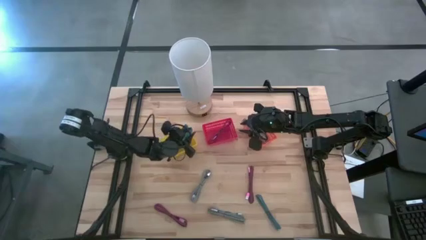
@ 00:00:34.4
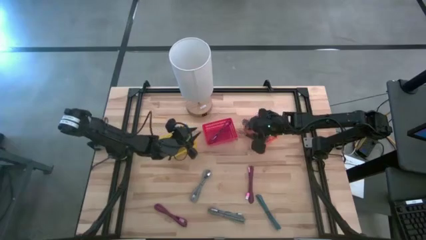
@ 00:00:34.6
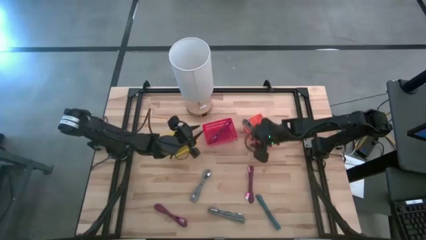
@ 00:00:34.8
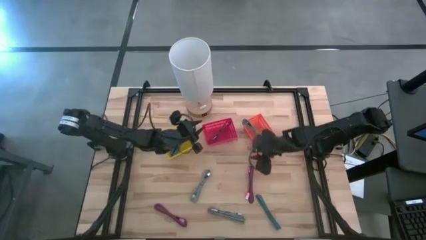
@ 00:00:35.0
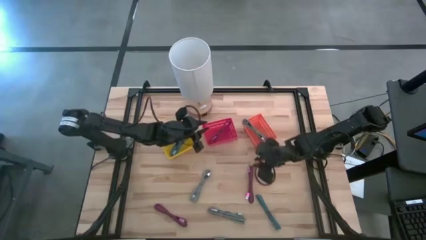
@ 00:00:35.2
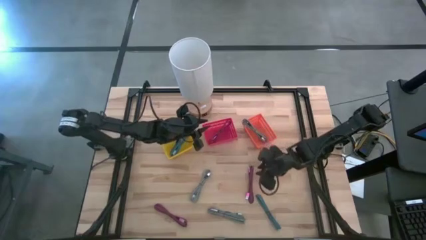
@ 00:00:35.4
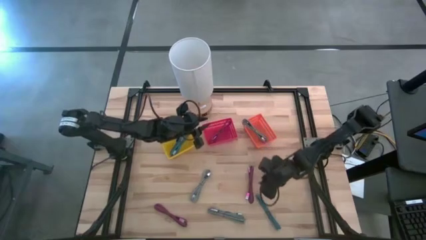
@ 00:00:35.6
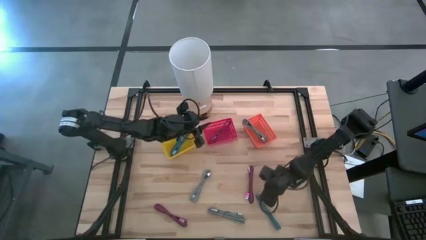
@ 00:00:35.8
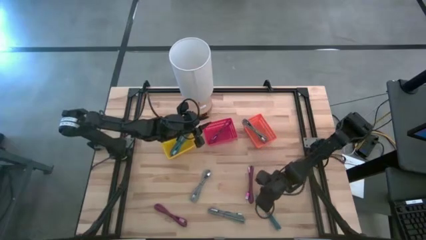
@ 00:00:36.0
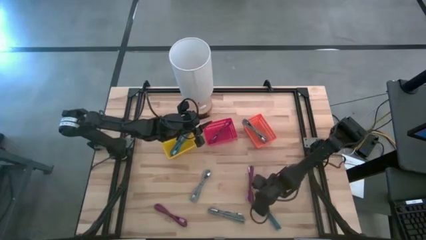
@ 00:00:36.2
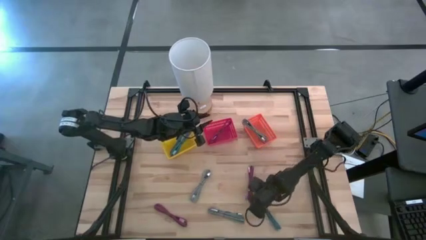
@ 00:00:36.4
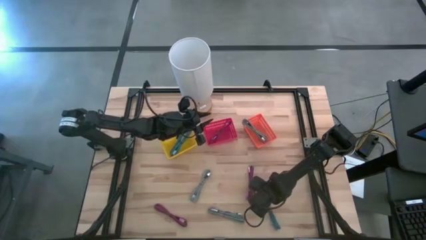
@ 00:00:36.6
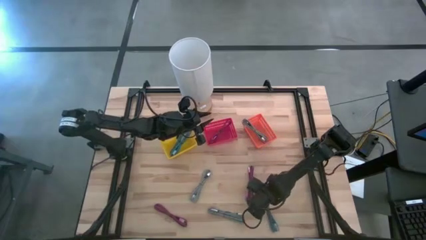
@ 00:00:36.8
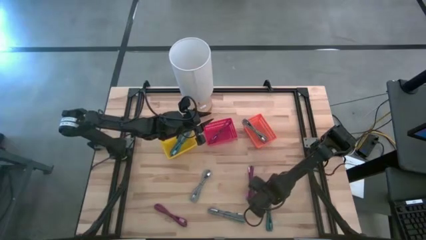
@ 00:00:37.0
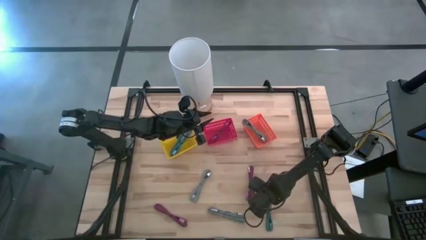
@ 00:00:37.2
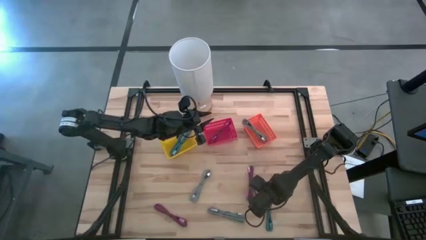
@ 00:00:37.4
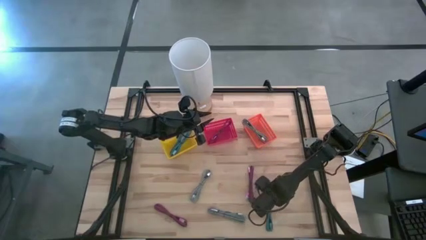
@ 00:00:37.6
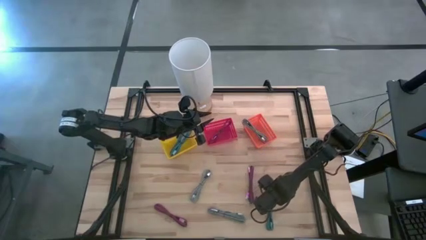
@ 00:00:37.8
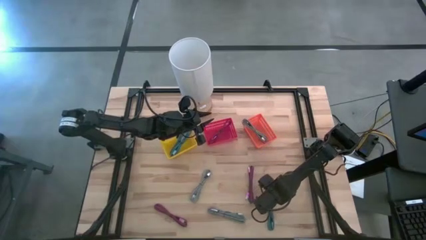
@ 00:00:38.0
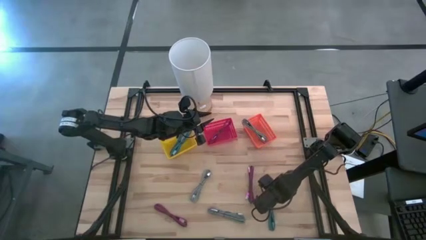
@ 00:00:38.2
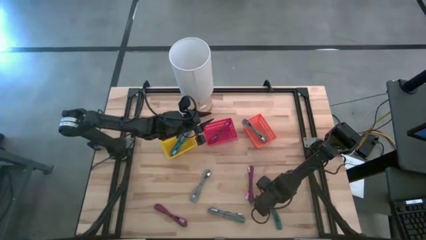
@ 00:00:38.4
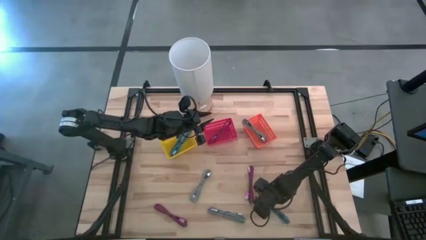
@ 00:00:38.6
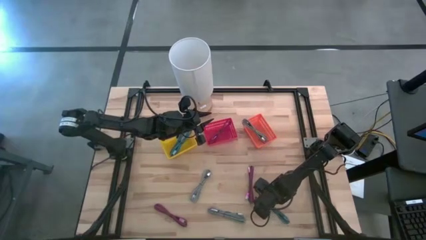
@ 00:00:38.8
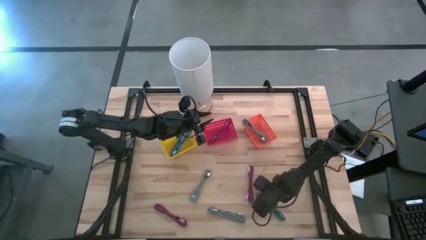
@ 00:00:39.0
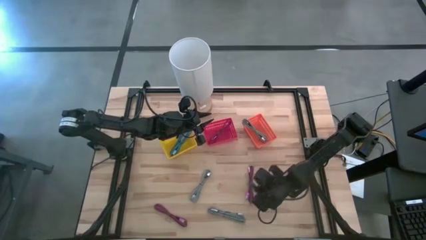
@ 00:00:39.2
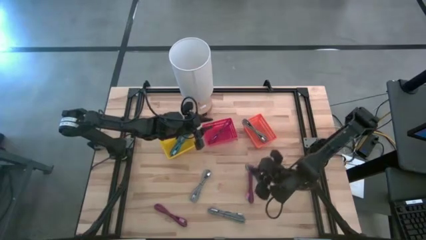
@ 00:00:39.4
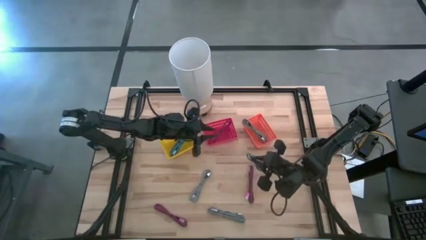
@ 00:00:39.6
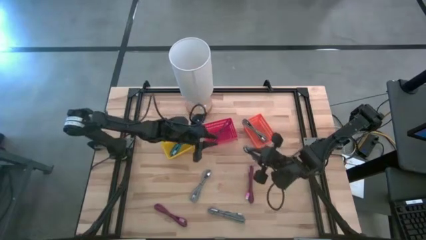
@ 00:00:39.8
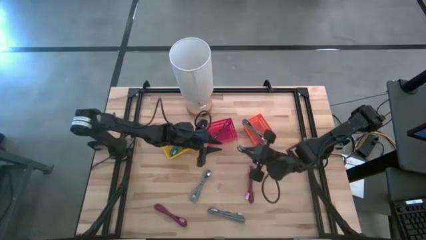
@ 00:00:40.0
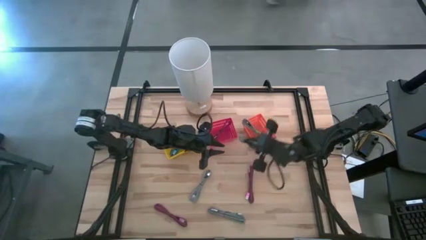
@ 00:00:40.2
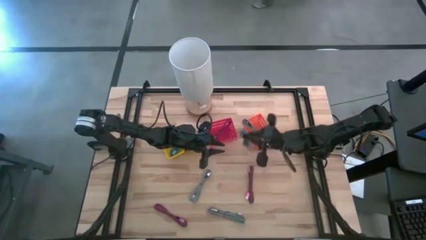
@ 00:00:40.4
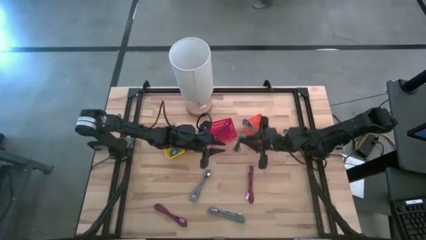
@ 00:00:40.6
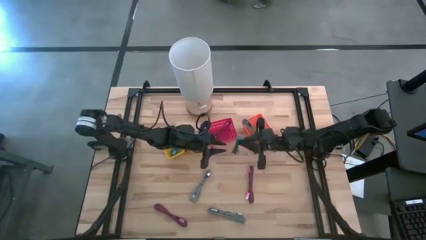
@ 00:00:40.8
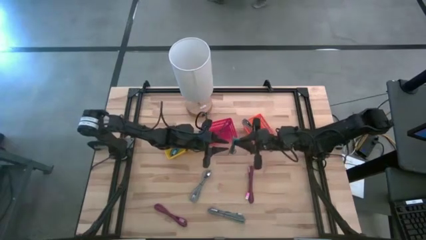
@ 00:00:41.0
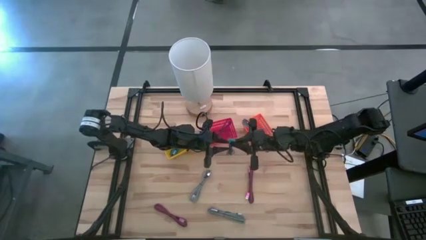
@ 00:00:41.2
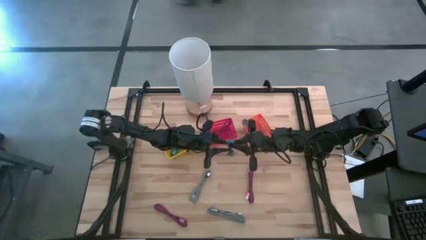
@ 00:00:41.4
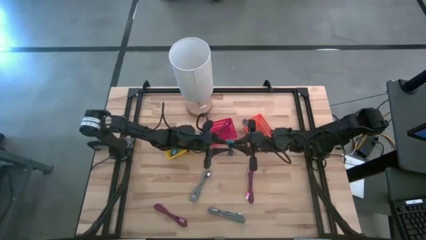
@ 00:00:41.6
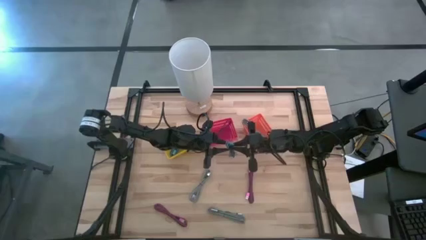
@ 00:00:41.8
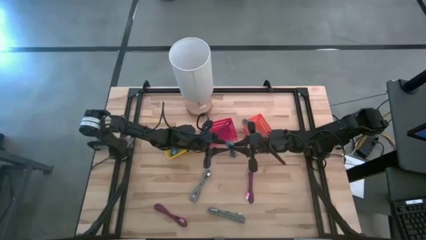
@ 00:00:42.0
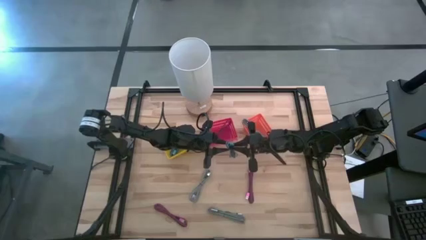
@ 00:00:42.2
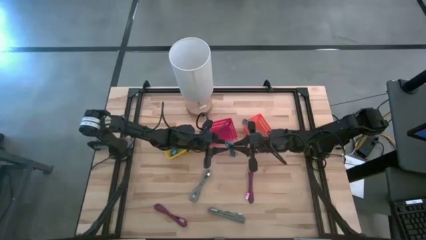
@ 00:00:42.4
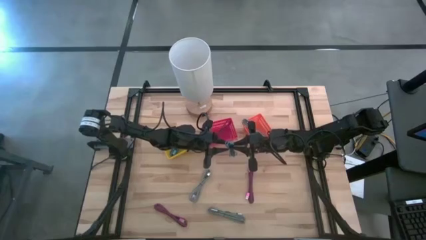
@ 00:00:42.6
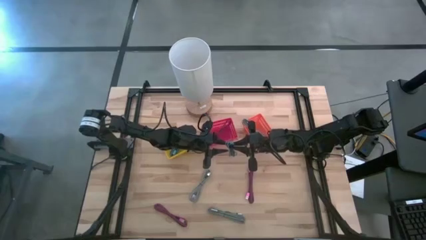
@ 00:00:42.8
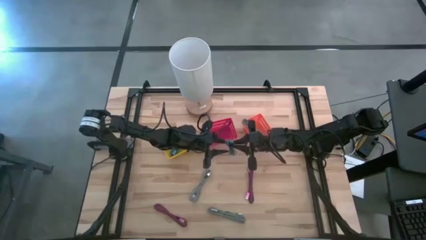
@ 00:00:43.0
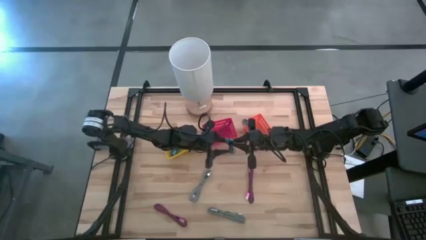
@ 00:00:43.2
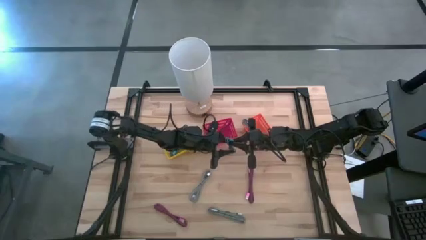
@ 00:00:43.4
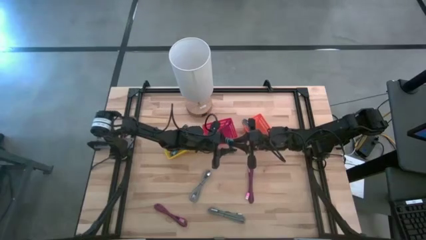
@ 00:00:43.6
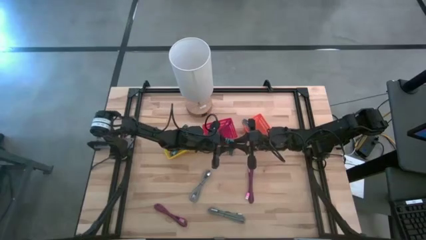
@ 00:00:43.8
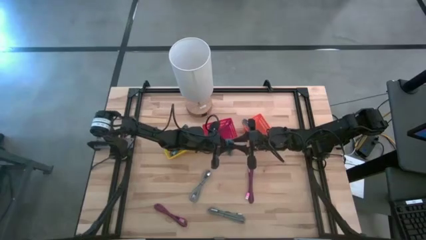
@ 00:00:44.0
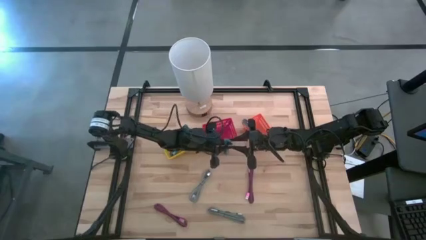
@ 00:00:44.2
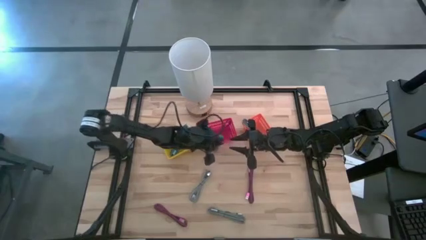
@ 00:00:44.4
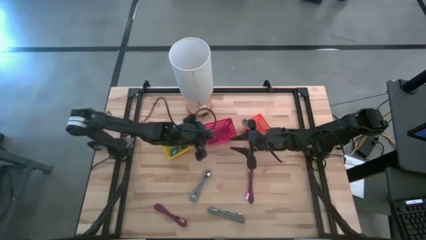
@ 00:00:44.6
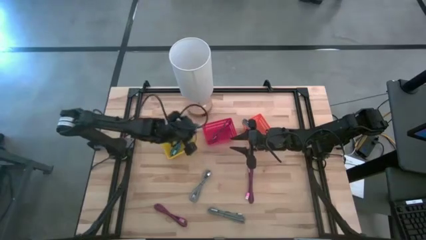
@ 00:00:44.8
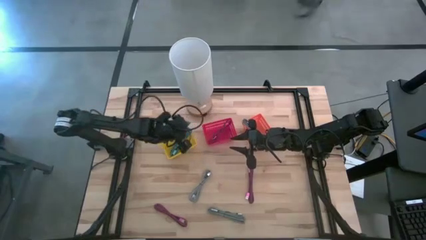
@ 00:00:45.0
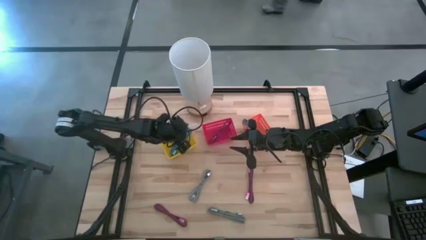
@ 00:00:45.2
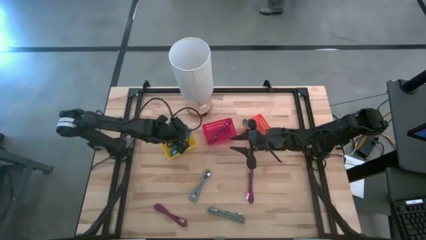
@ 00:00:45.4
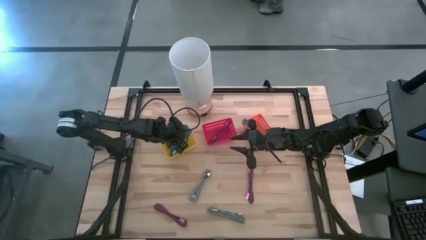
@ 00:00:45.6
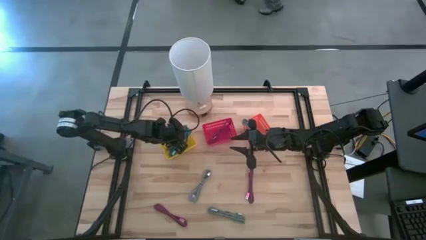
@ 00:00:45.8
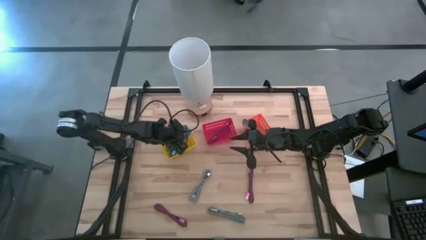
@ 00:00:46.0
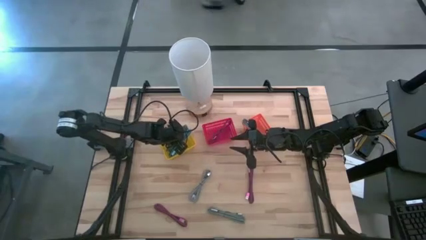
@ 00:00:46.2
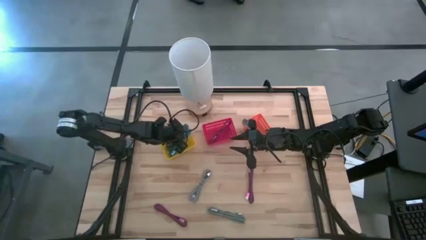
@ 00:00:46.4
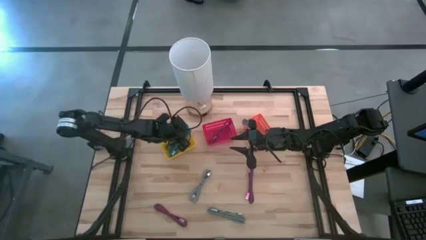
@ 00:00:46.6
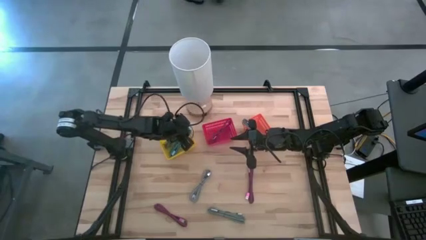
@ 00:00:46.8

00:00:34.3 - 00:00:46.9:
Task: Pick & Place USB Port
Put the blue charger cable into the yellow bin

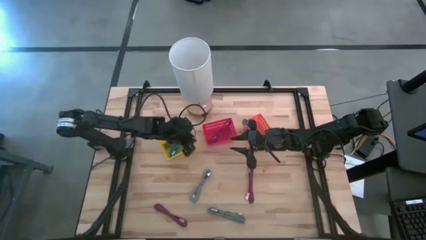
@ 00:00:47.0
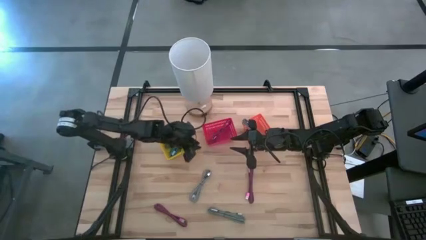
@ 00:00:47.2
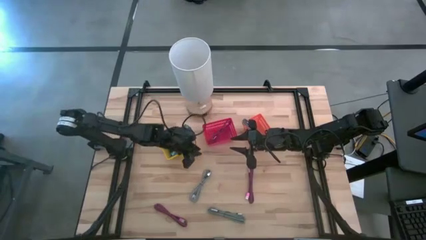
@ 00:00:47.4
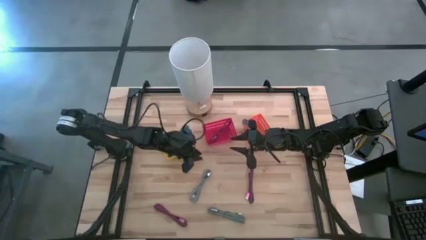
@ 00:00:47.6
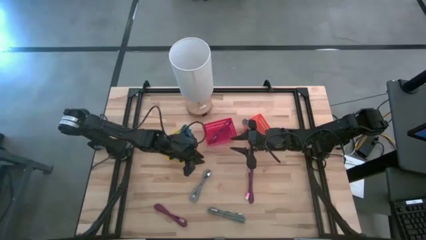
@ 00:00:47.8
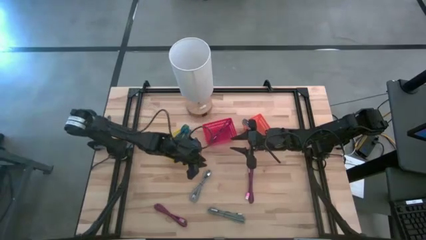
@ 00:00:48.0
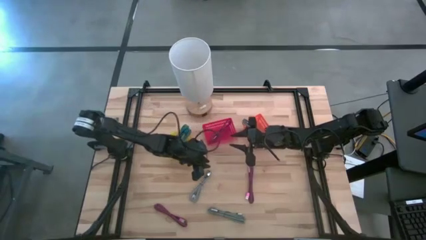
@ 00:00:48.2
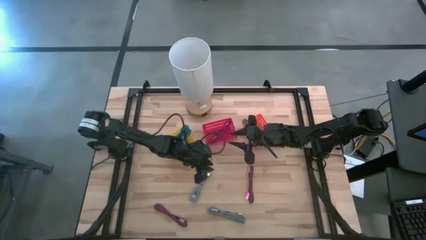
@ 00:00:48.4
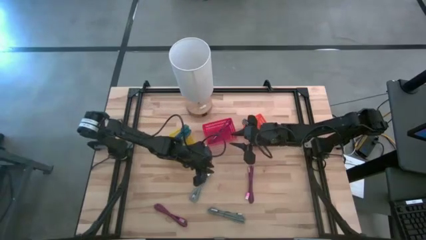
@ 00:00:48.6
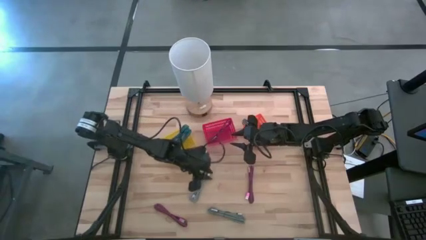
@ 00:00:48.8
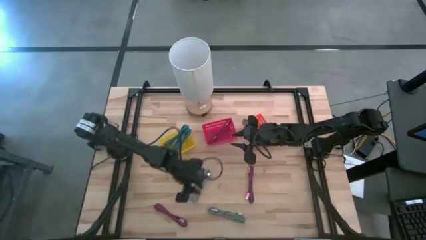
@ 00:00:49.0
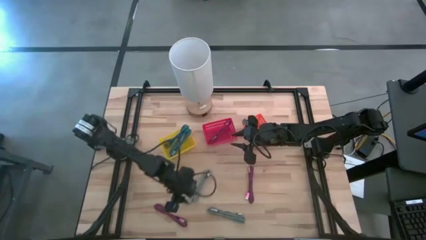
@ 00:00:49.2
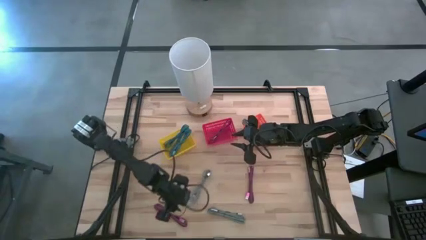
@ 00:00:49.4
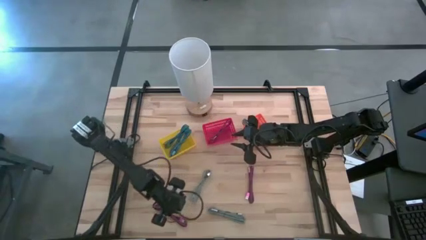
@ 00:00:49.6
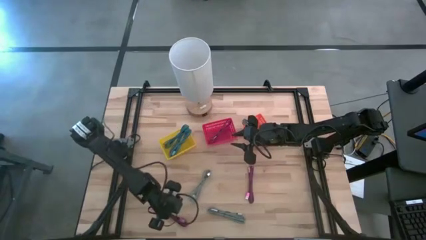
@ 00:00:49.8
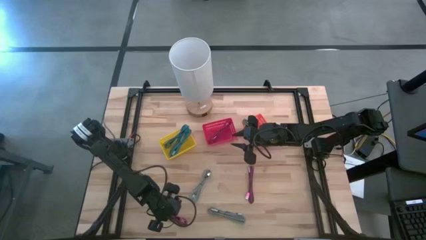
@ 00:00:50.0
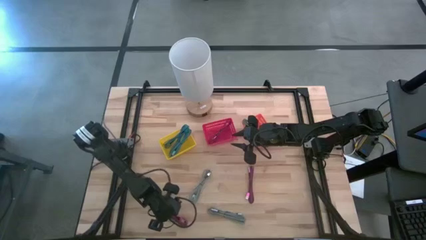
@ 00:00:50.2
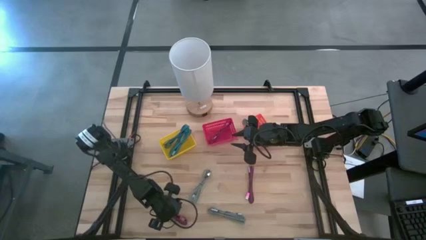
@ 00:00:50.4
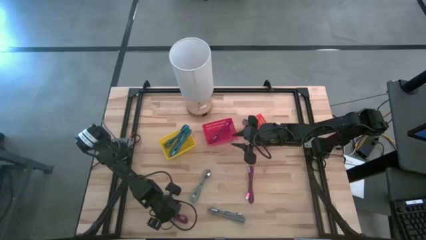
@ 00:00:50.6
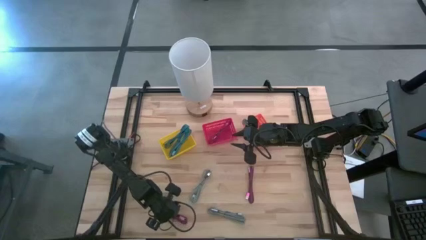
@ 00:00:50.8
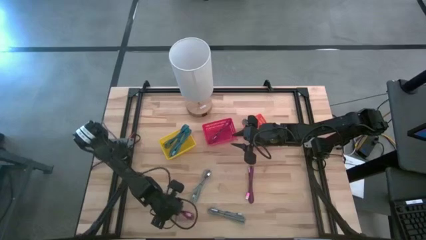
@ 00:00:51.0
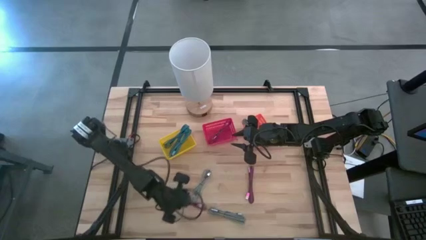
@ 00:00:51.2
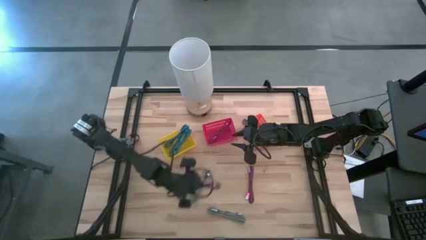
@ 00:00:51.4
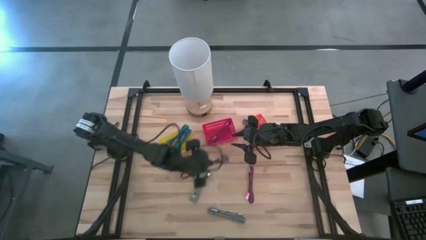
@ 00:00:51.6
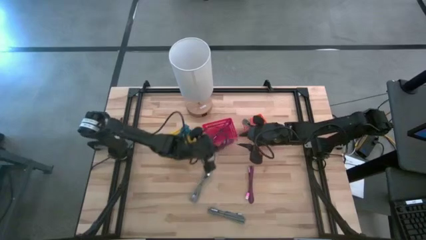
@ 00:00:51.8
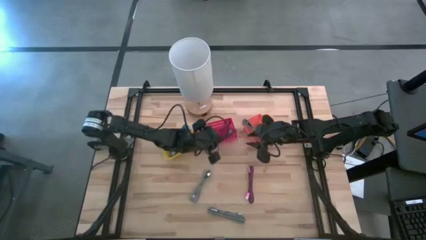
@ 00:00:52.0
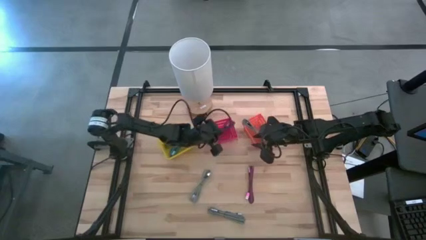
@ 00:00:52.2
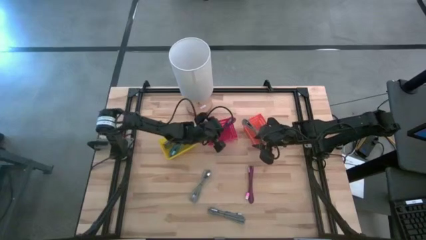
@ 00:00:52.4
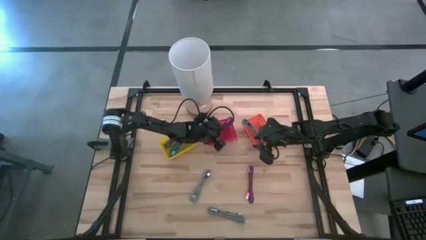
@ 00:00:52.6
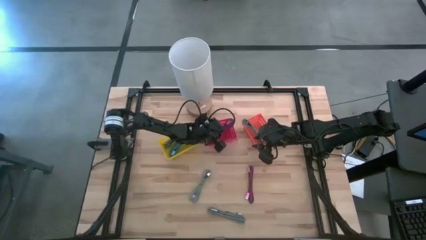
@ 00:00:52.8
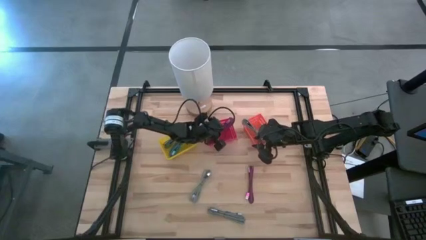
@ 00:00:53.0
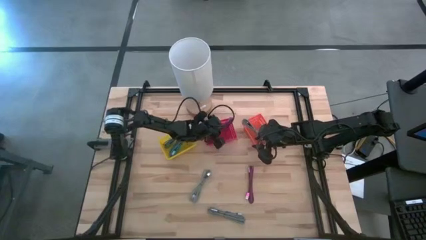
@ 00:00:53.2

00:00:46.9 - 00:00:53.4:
Put the bottom pink charger cable into the red bin
